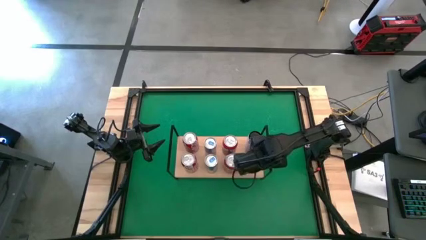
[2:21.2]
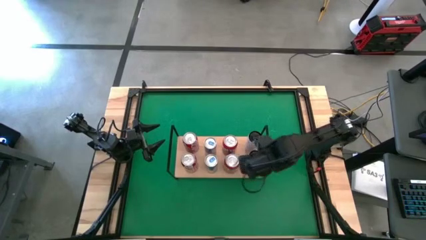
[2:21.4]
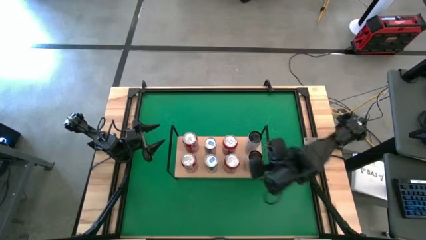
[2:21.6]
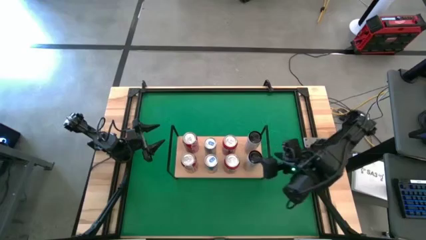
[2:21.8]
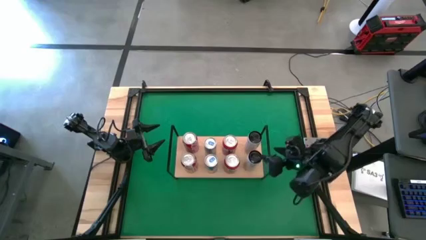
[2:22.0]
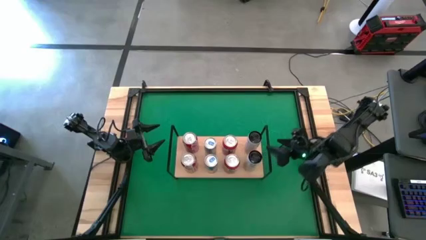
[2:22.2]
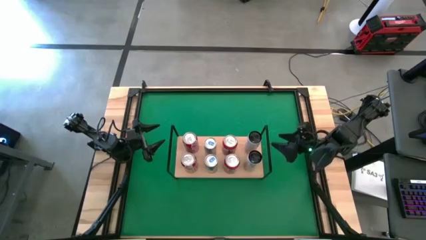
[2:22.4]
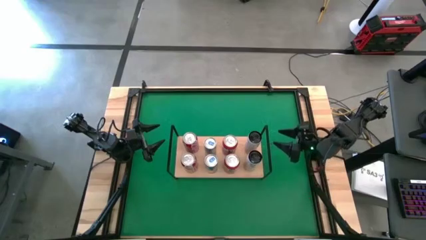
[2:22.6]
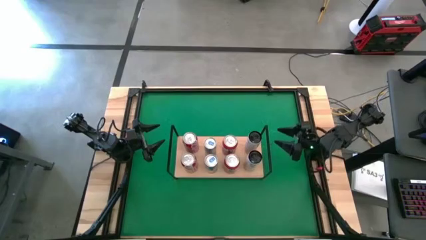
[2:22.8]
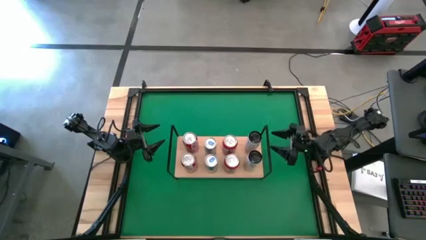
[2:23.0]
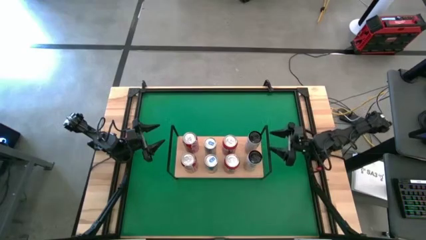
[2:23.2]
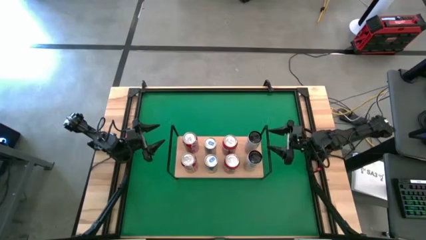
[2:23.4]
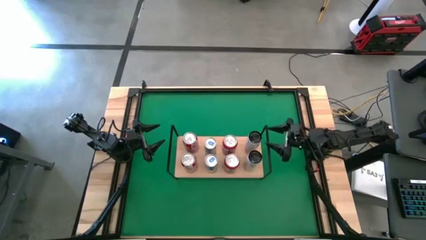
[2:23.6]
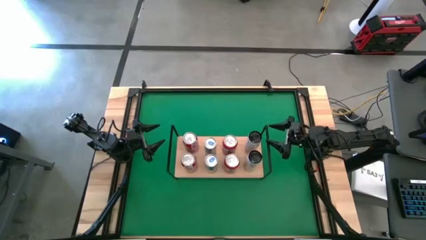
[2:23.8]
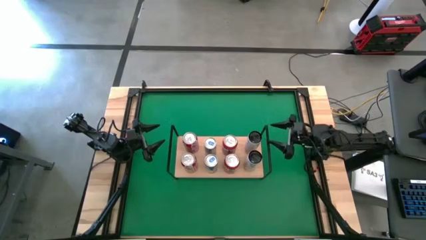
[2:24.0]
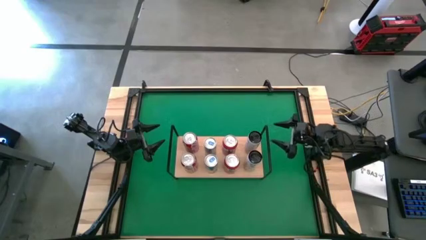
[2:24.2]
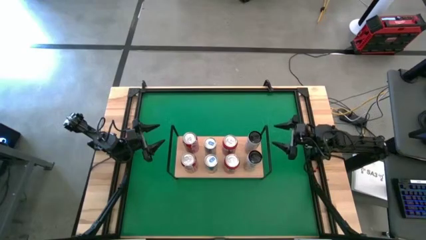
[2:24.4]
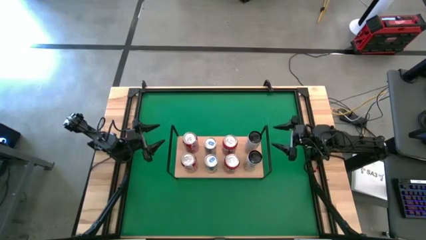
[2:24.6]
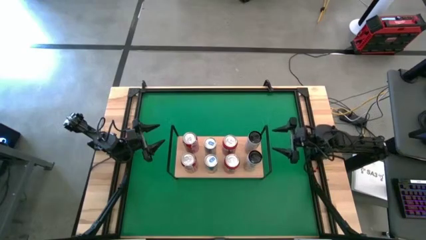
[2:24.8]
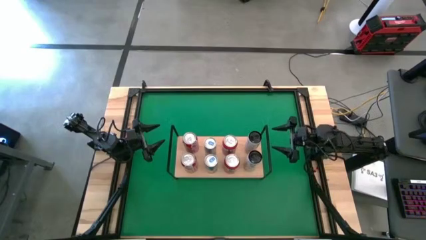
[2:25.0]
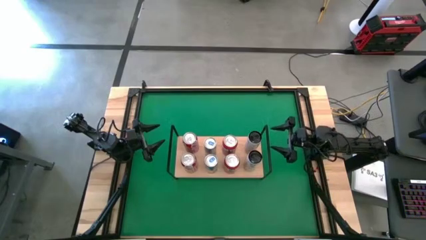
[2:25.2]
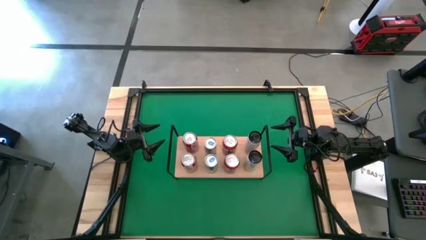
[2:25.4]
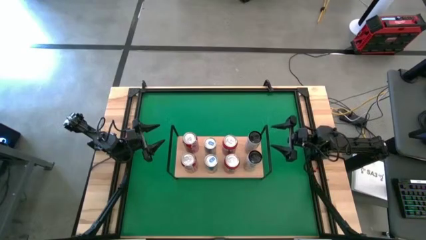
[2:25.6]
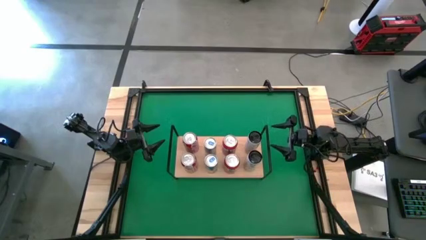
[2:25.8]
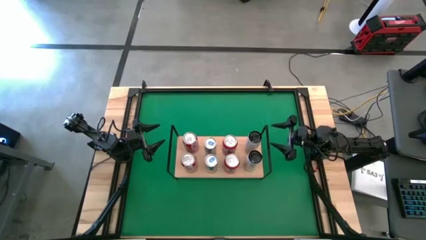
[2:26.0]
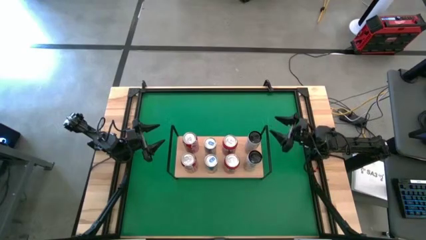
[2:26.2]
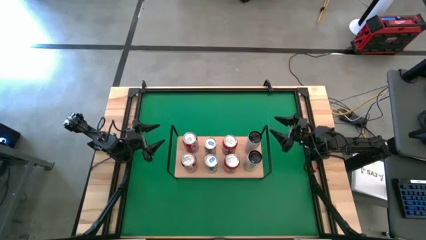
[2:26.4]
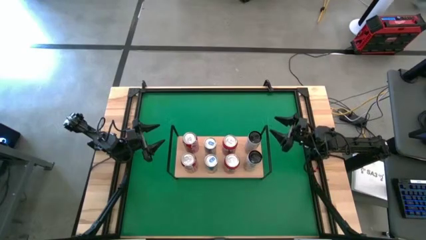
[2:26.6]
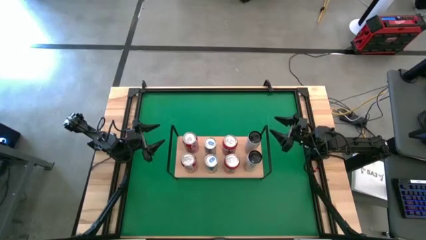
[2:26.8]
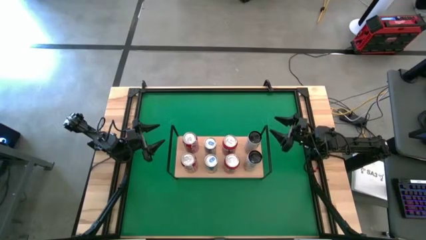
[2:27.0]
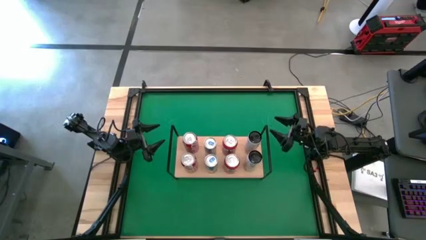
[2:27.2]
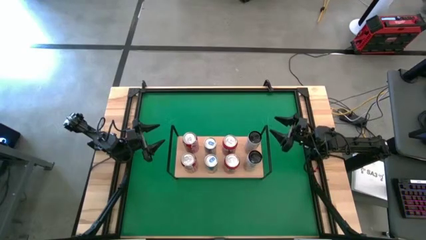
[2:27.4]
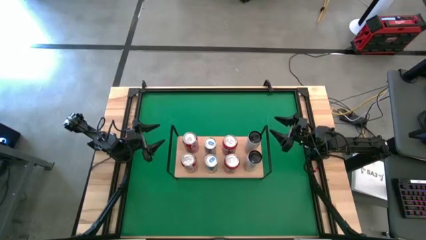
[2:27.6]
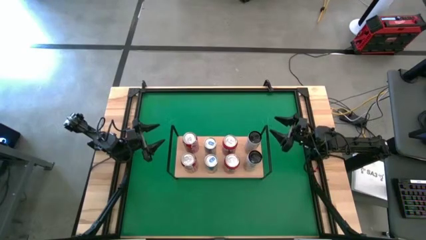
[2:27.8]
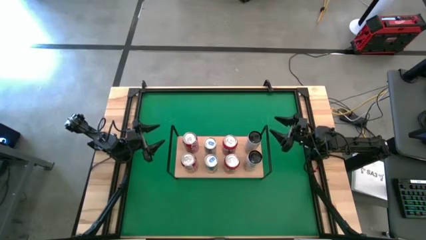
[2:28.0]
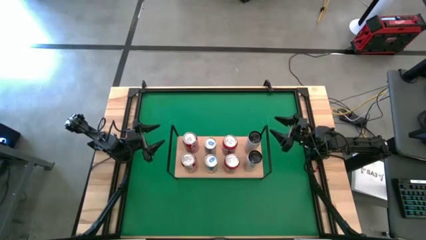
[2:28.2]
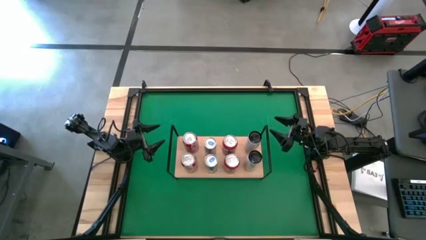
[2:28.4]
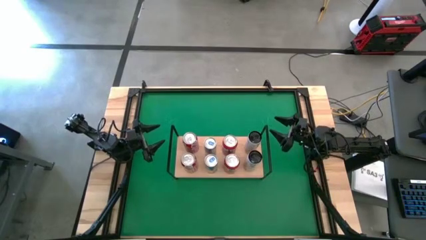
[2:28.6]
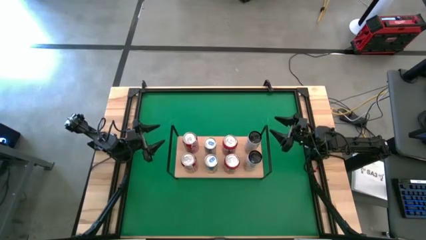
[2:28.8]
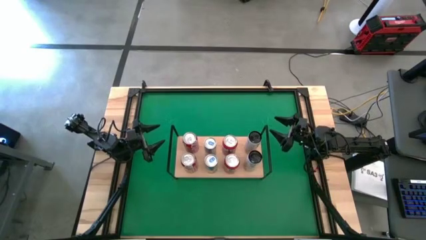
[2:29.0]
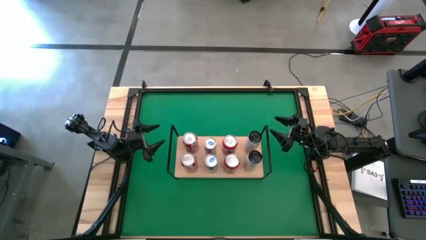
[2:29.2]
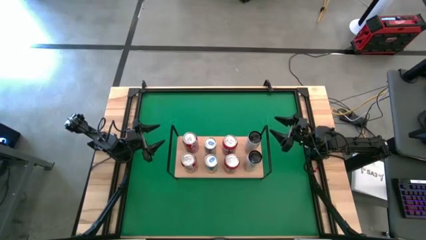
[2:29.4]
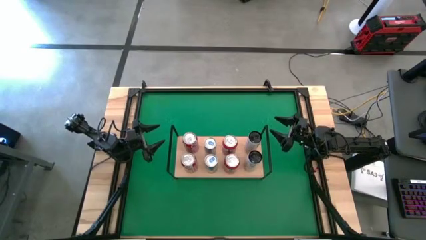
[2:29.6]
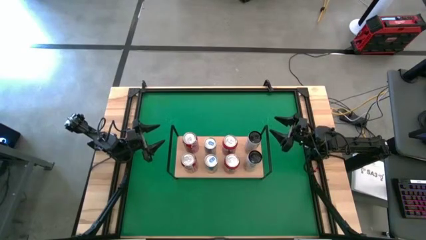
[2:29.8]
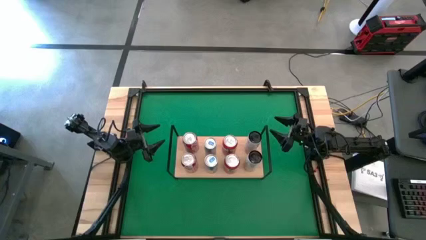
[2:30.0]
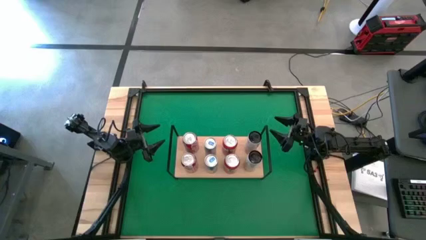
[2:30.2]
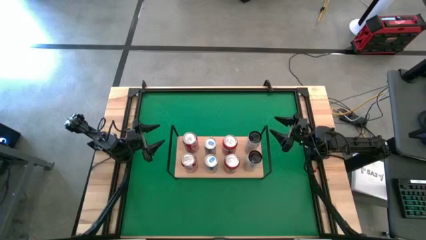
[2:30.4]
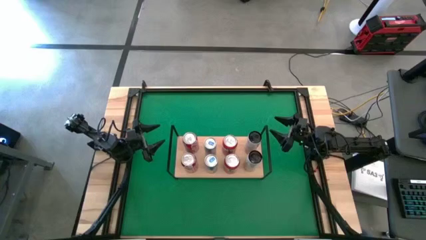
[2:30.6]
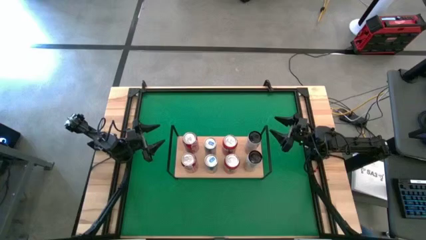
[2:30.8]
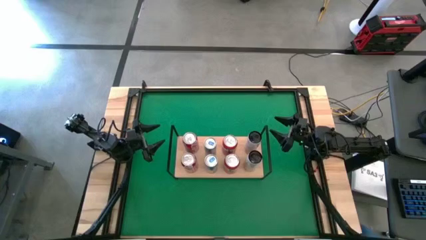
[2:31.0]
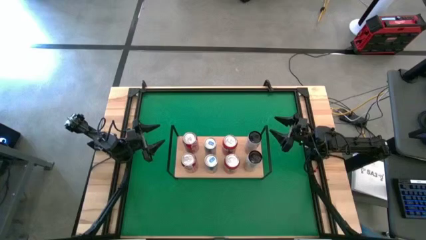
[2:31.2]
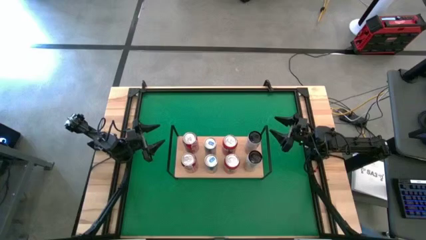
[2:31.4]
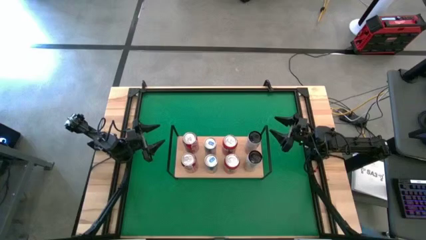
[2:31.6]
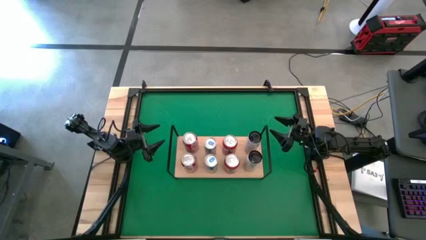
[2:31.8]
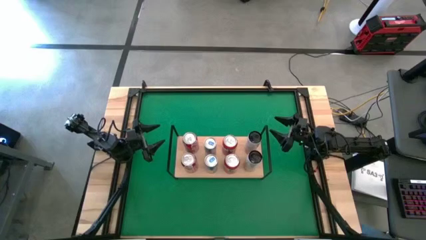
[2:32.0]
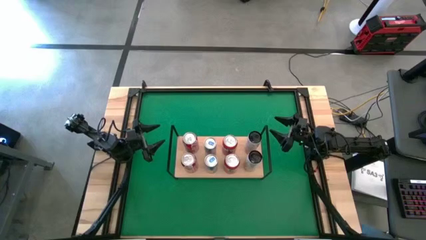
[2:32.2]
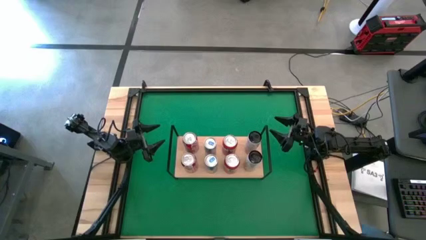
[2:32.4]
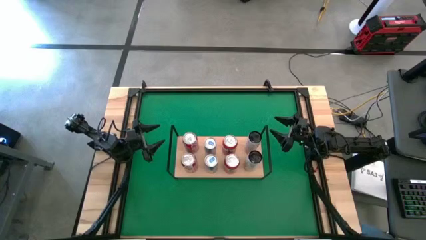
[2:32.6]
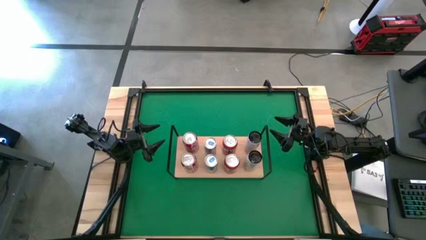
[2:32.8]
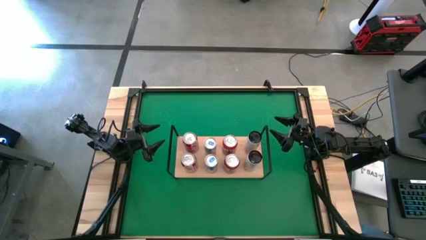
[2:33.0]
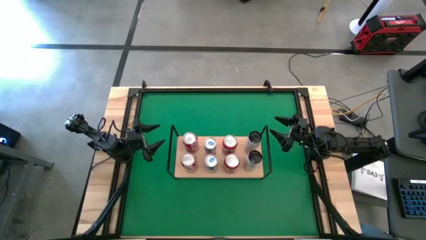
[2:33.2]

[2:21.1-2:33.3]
Task: Place canned beverage on shelf
Return to Home Position

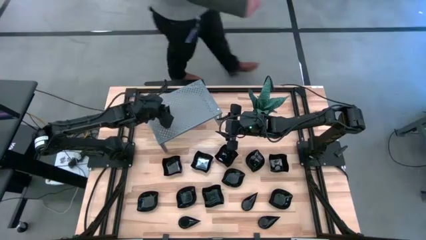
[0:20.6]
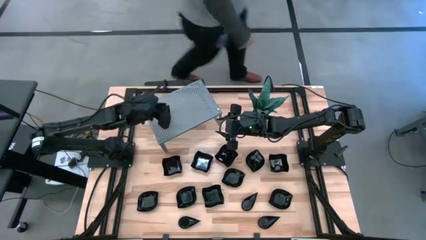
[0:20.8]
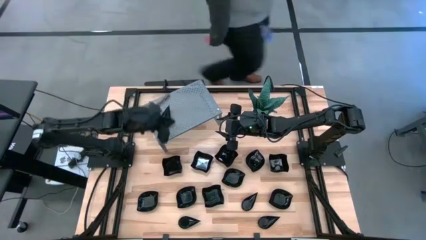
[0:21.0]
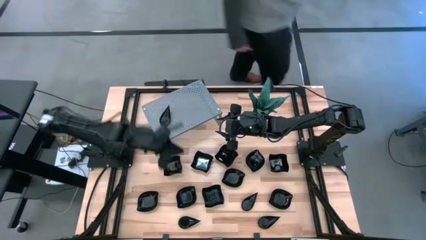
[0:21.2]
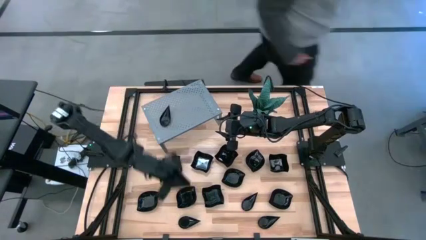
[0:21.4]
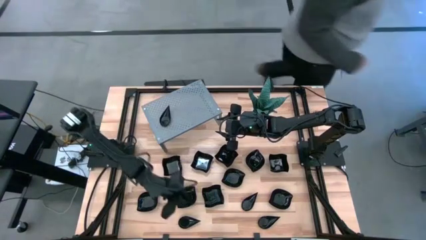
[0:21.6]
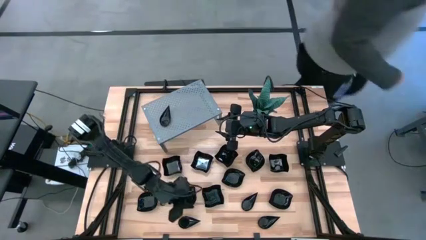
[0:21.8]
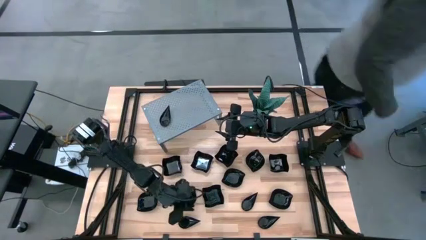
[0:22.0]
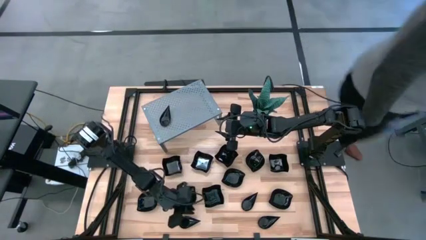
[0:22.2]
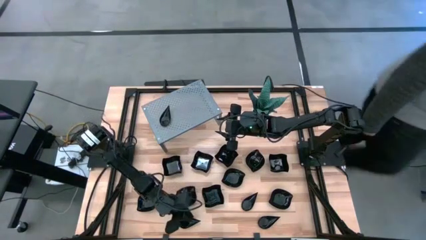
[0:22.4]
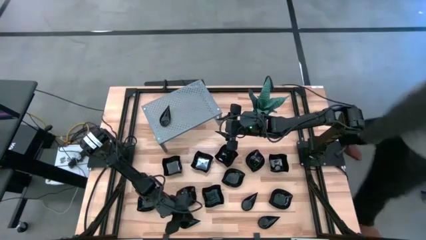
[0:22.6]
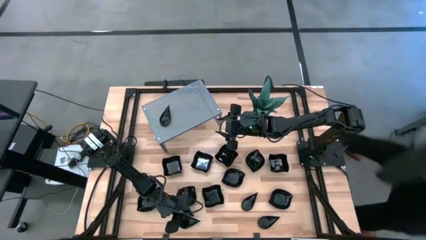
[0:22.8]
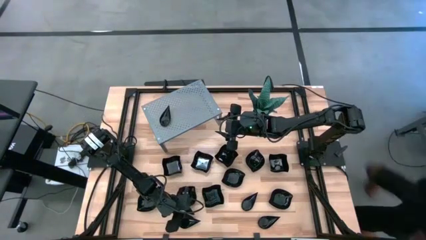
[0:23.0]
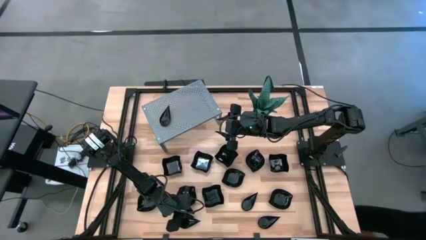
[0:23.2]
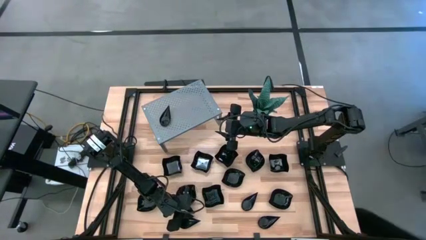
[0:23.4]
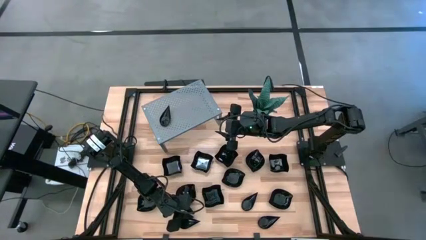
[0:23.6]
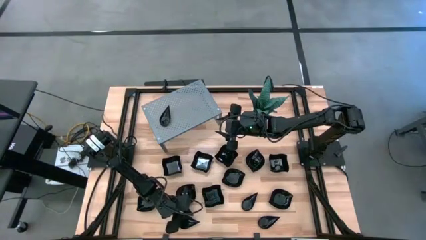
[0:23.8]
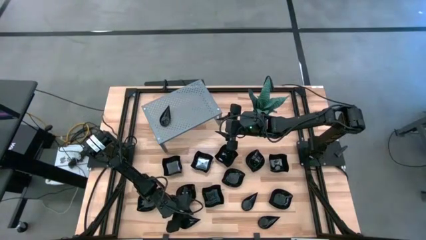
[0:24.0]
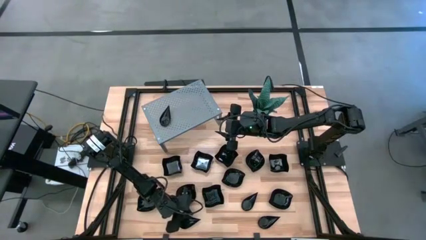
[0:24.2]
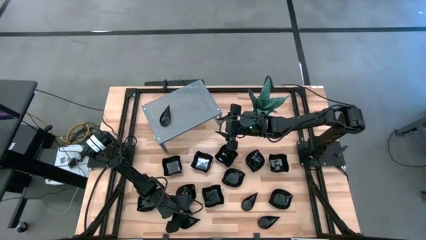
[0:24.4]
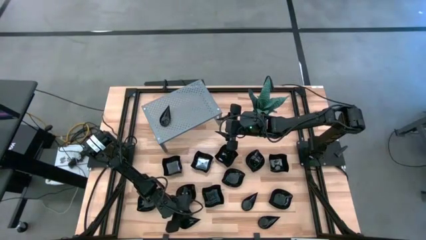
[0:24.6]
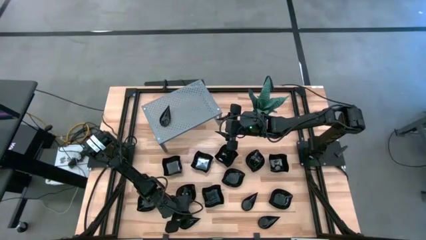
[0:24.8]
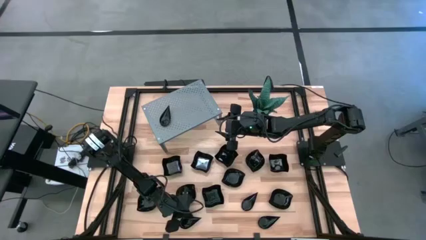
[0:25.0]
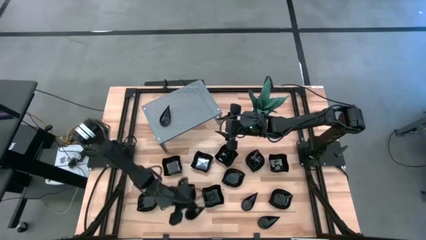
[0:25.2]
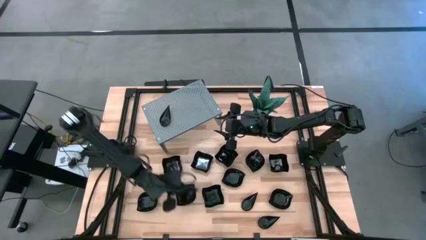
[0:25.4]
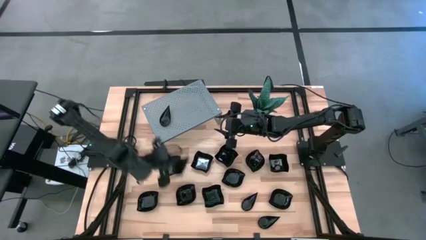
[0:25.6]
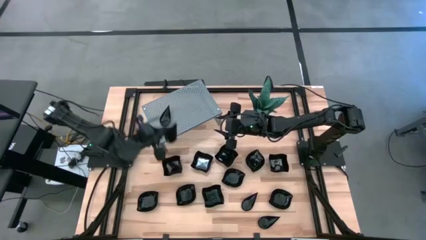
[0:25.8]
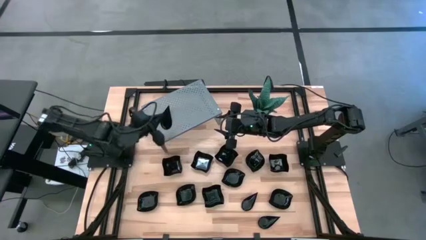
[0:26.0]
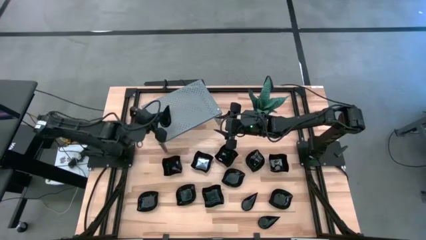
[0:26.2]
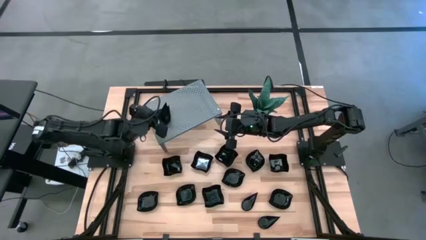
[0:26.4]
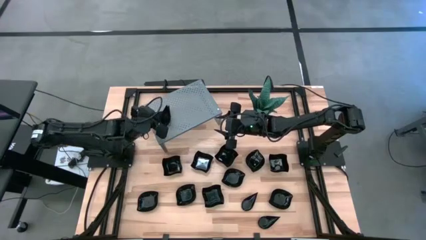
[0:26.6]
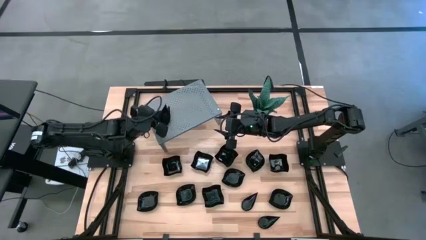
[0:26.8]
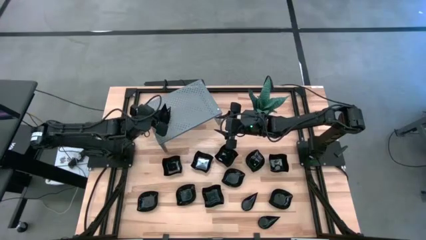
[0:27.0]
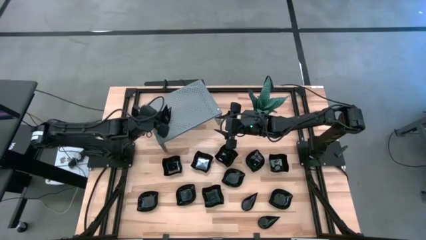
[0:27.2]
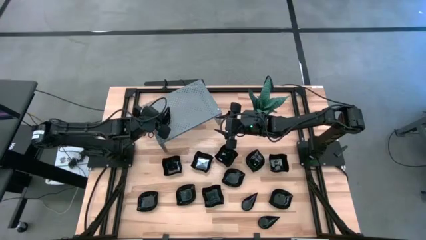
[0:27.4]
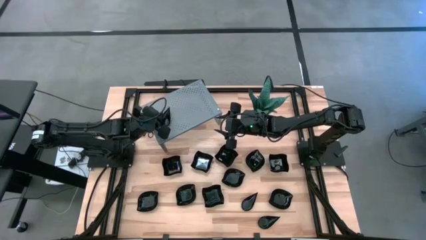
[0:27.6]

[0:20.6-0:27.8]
Task: Pick & Place Mini shaped plates
Stack the black drop-shaped plate on the black drop-shaped plate on the shelf
